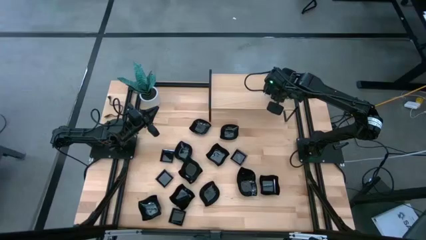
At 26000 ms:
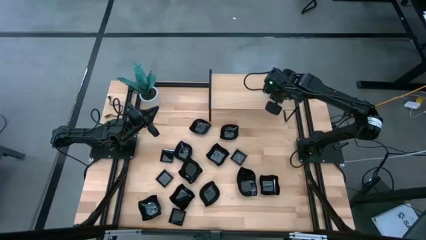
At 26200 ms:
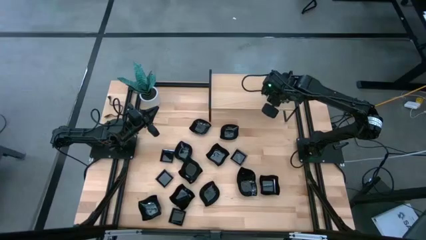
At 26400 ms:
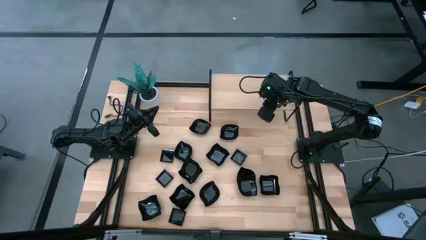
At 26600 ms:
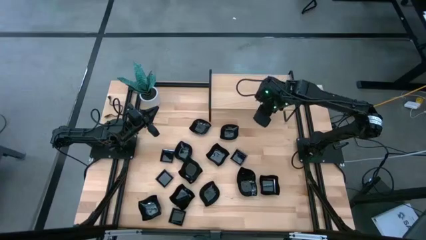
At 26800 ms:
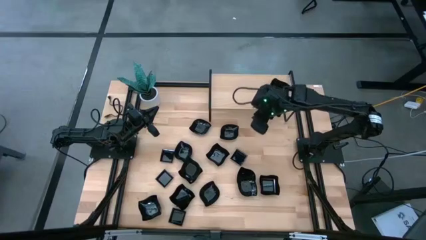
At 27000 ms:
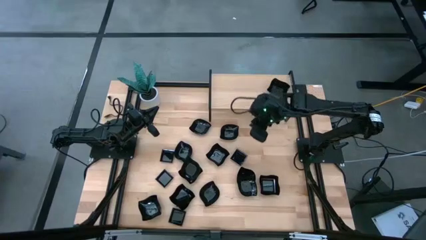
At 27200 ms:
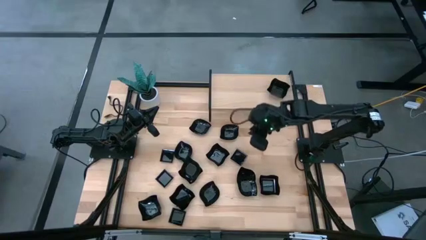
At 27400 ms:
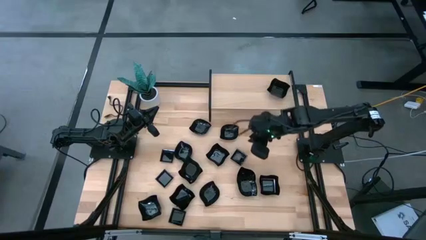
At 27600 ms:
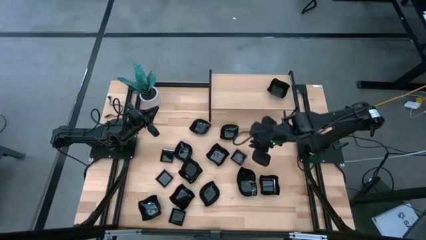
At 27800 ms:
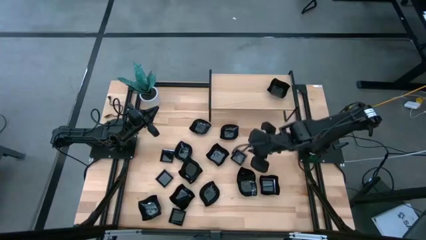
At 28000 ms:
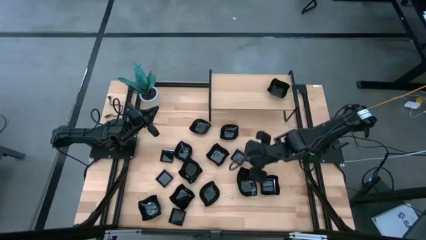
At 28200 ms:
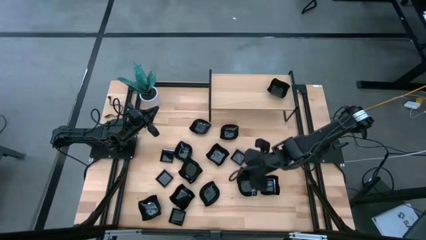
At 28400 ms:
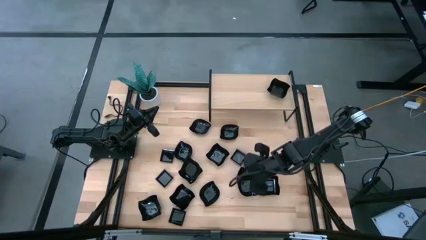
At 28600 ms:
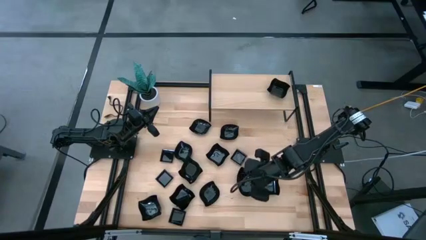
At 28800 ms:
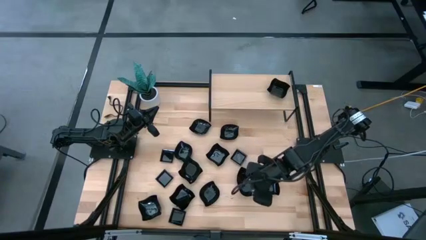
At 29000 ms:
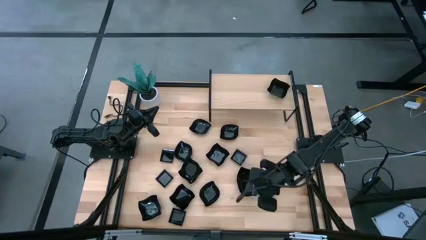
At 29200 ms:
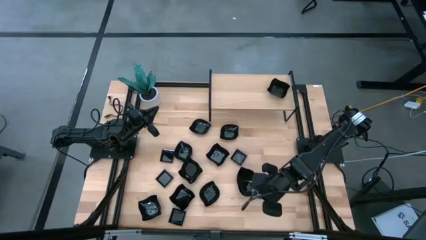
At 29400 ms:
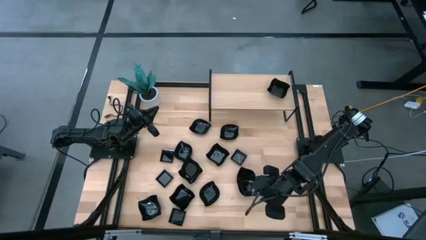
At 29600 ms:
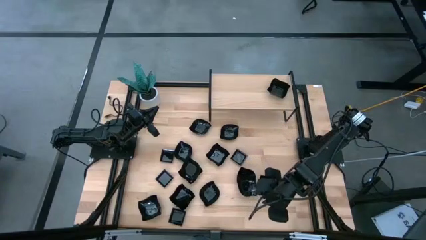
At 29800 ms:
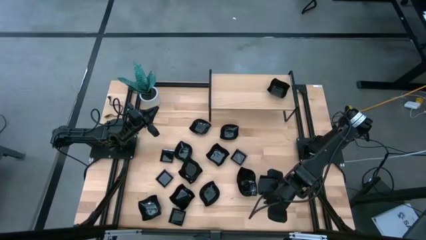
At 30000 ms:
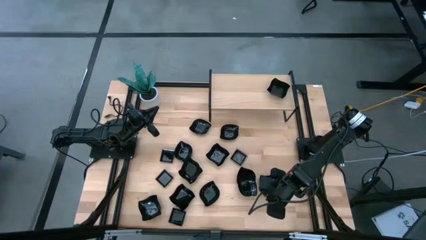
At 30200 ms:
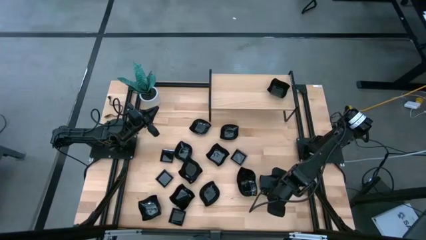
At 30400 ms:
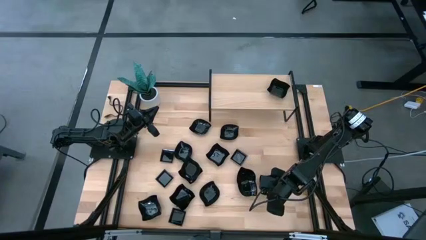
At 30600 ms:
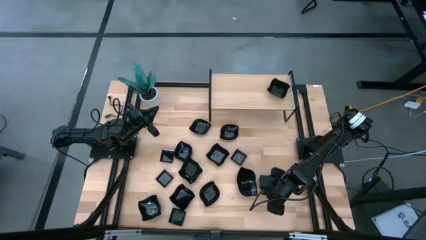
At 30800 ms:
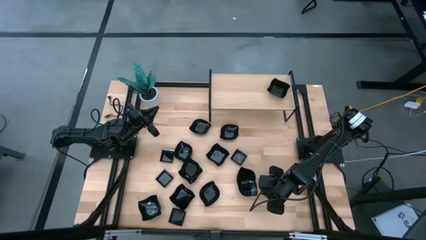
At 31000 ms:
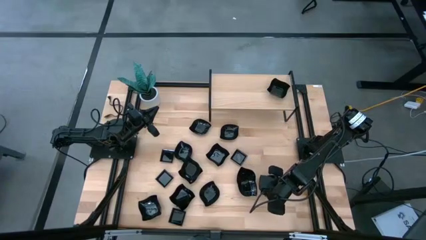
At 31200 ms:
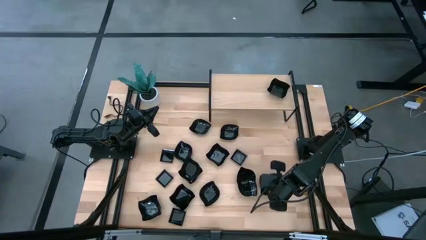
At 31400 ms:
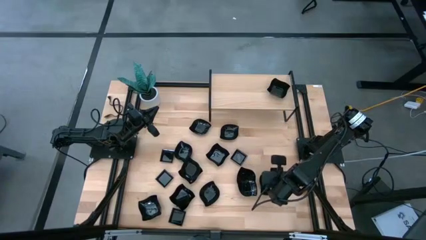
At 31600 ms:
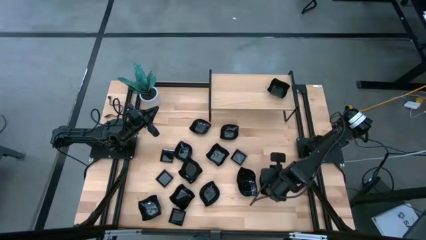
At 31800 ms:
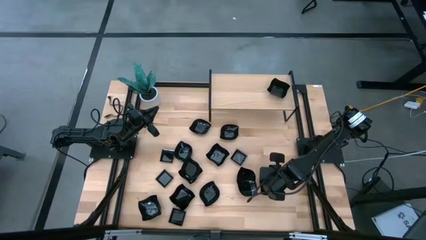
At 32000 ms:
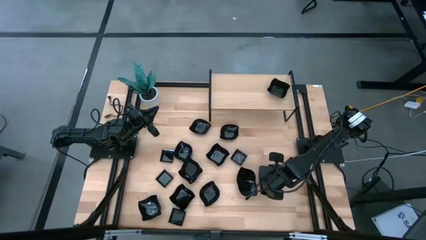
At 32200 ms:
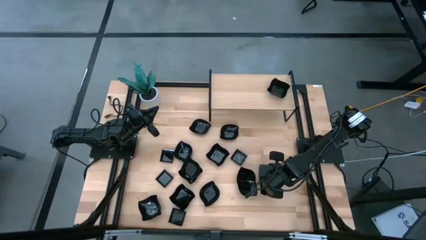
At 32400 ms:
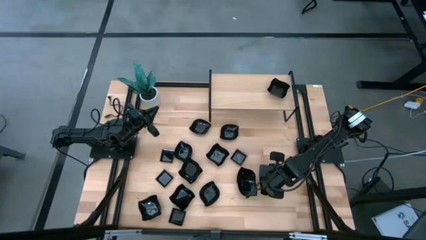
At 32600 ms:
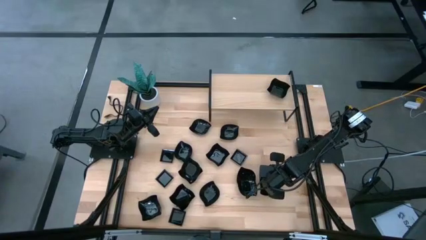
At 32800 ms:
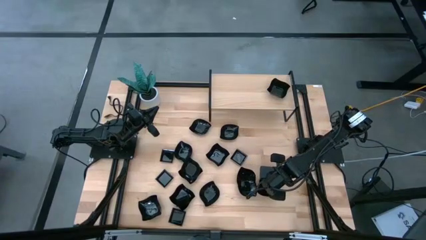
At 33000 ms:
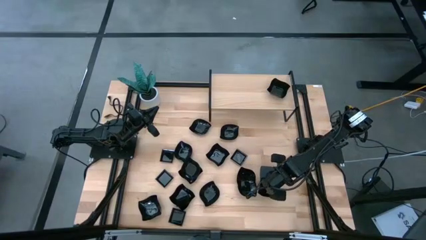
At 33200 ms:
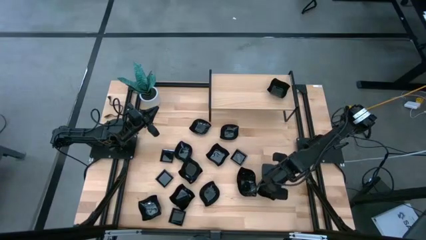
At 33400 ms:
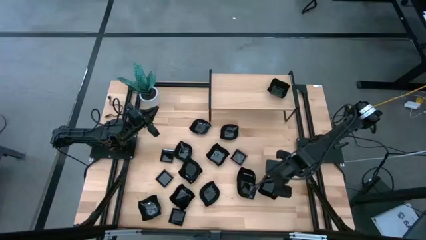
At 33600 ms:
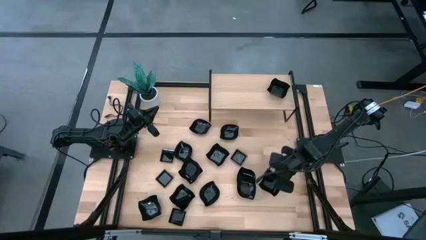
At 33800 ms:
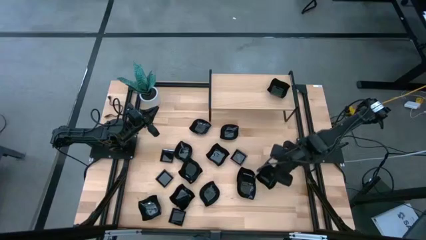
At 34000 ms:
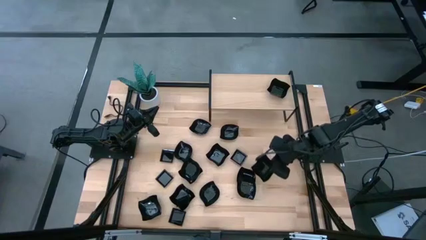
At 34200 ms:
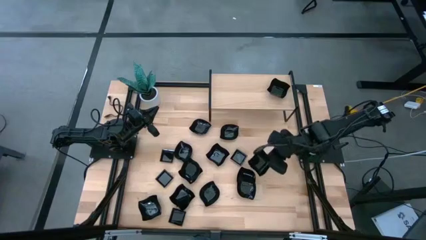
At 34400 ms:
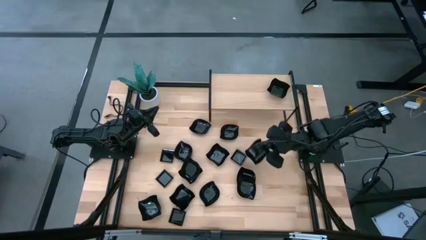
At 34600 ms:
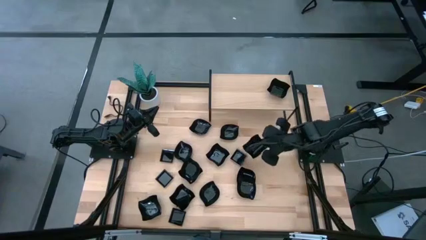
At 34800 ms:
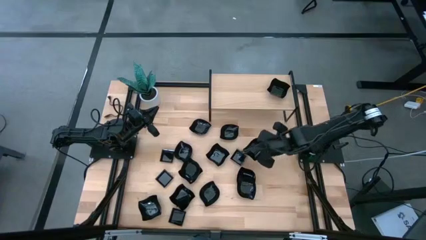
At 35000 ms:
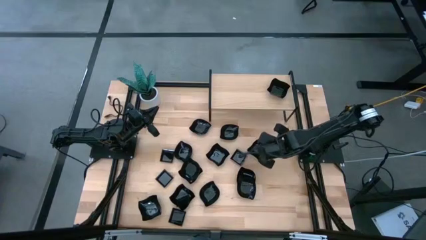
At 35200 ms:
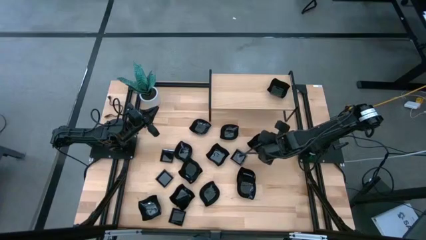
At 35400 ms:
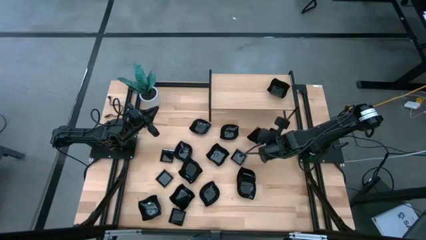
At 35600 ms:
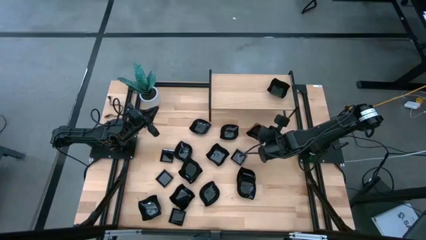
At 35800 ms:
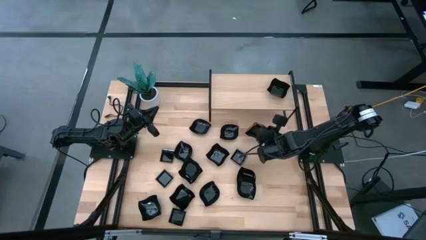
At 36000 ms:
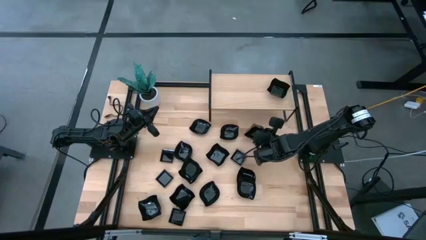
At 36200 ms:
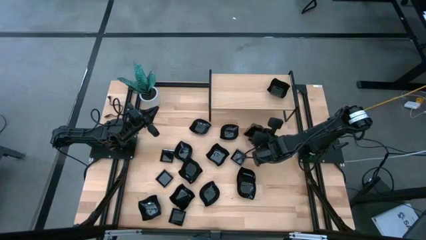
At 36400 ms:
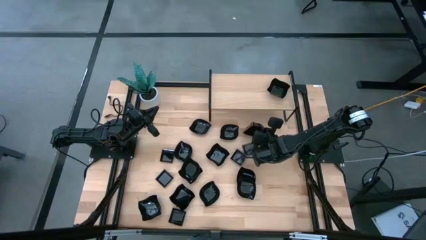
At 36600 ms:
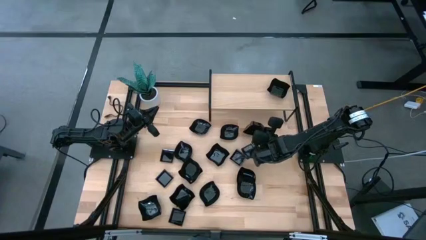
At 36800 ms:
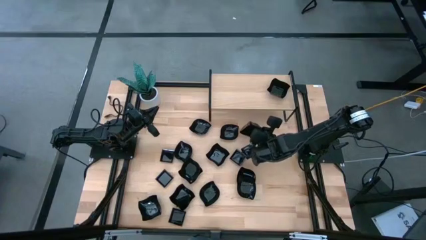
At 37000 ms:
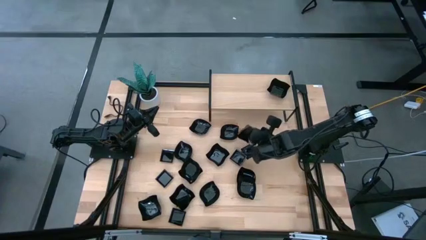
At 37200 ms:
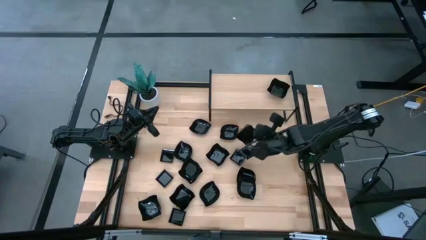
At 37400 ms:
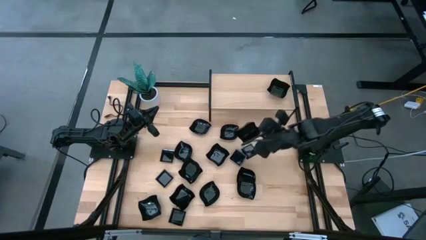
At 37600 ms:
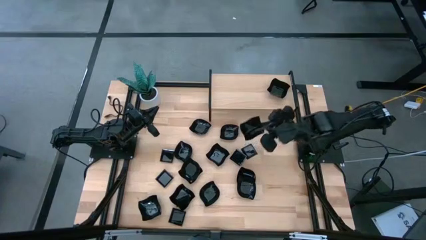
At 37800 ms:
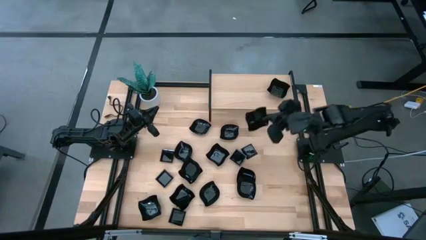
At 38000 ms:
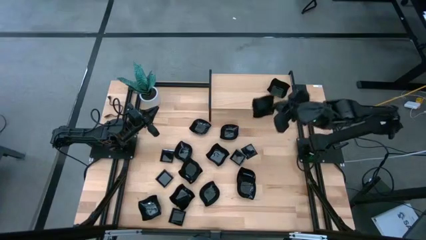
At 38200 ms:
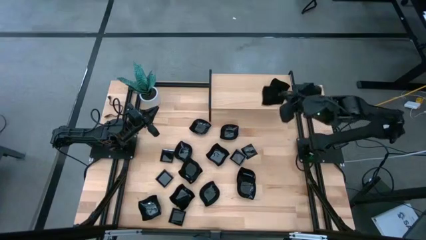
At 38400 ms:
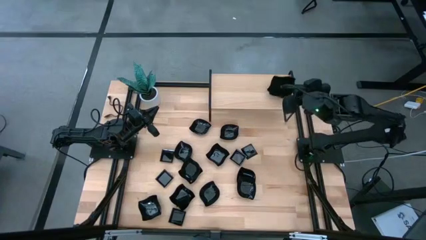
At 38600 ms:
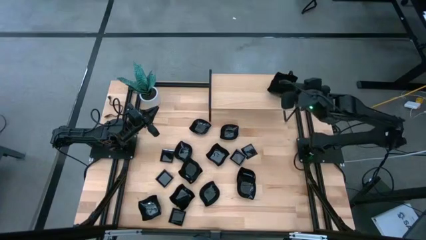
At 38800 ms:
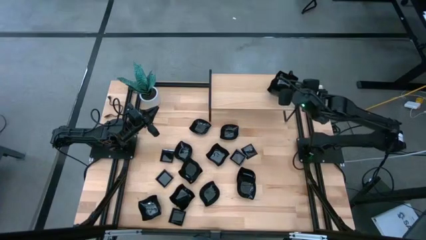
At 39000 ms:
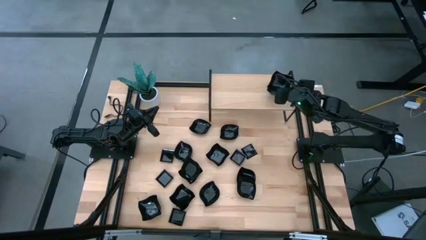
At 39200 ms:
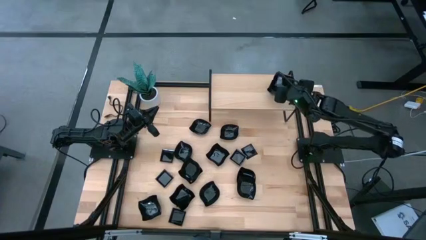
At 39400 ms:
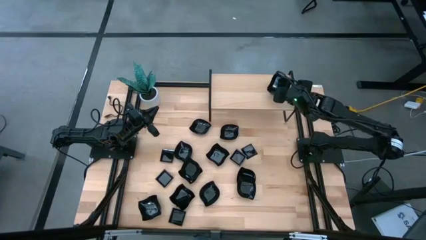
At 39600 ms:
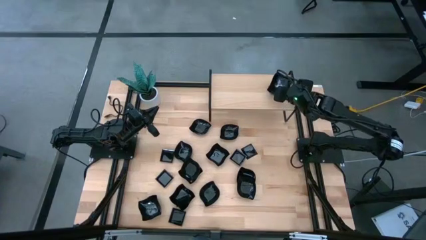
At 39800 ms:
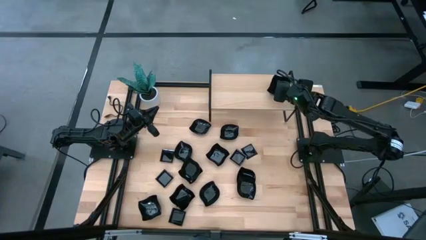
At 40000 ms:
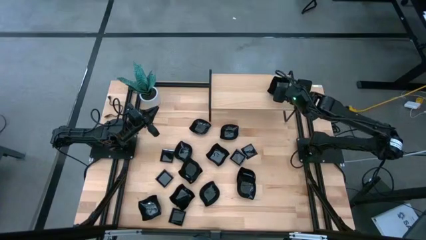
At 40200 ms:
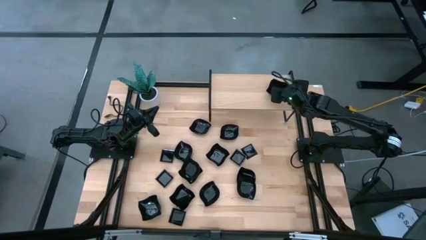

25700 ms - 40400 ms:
Task: Pick & Place Mini shaped plates
Stack the black distorted square plate on top of the black distorted square plate on the shelf
